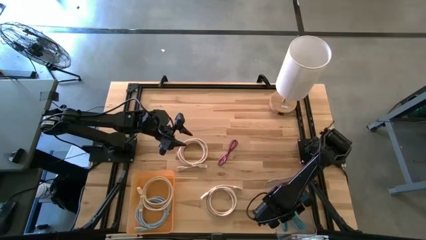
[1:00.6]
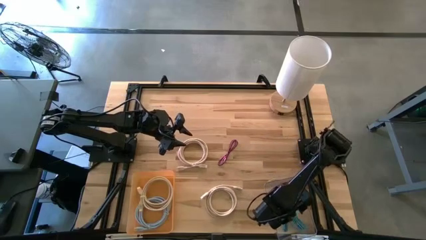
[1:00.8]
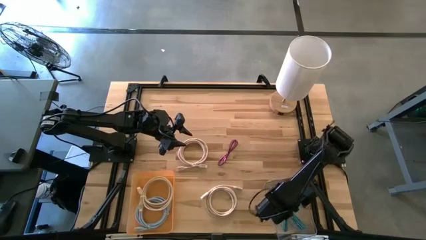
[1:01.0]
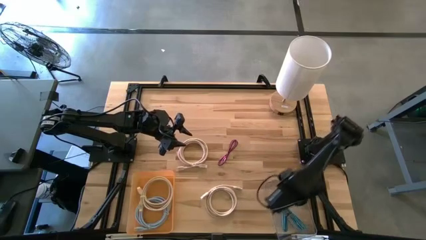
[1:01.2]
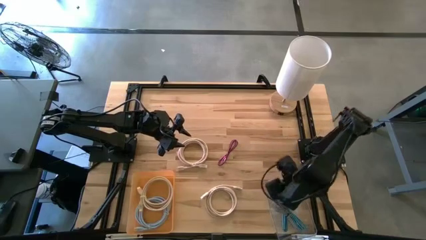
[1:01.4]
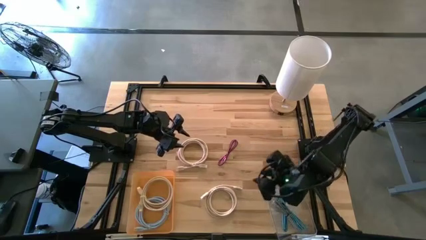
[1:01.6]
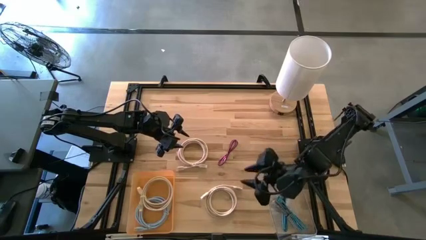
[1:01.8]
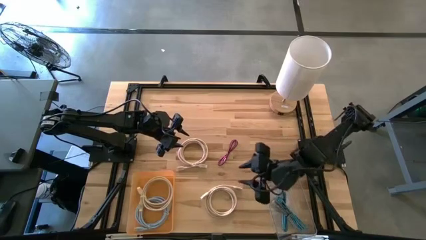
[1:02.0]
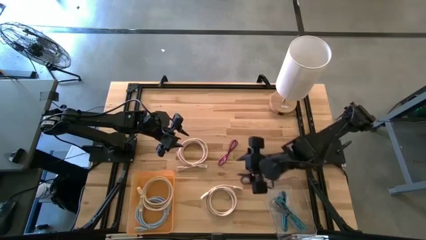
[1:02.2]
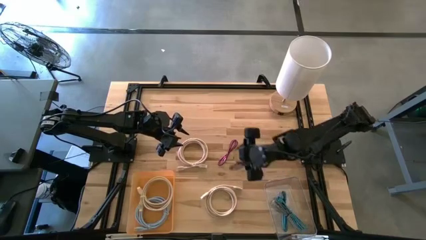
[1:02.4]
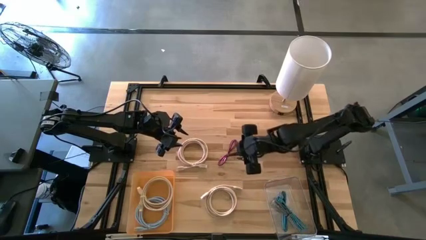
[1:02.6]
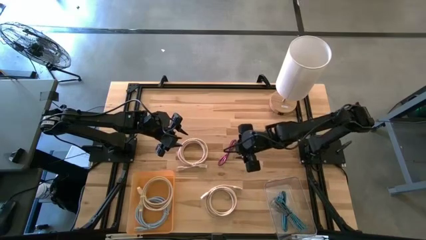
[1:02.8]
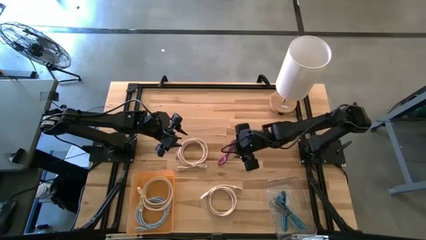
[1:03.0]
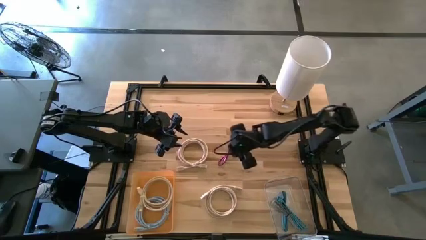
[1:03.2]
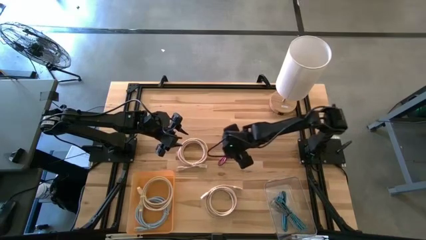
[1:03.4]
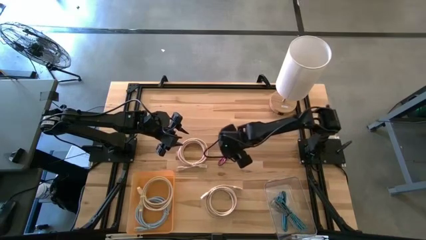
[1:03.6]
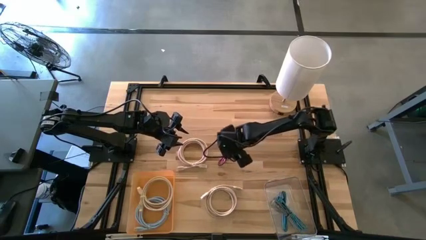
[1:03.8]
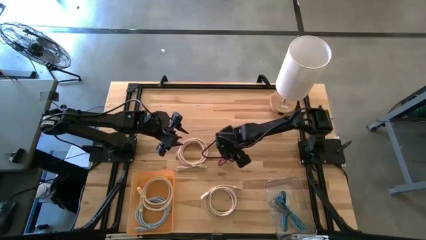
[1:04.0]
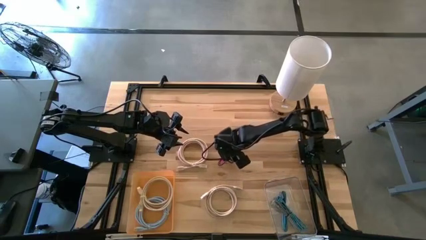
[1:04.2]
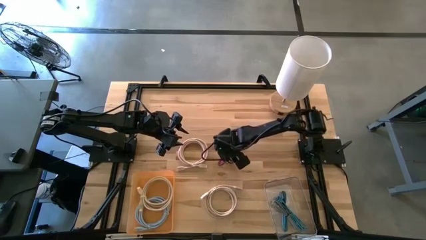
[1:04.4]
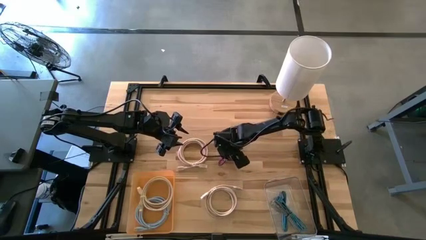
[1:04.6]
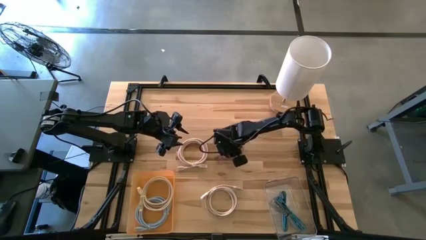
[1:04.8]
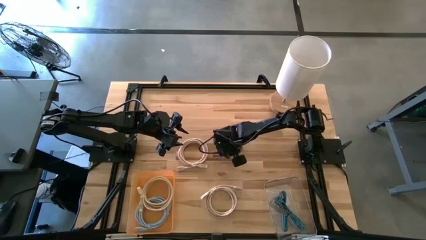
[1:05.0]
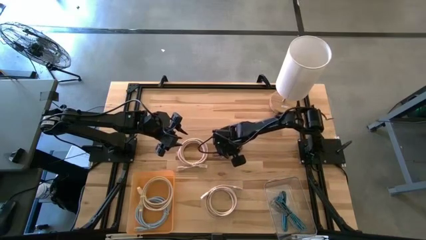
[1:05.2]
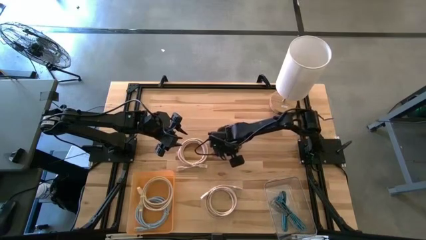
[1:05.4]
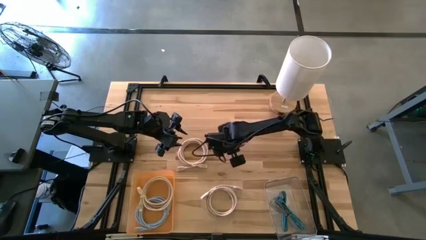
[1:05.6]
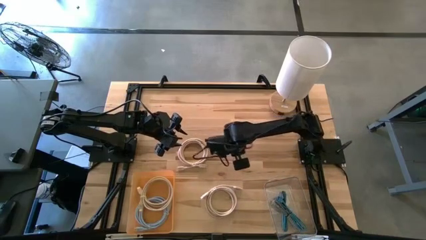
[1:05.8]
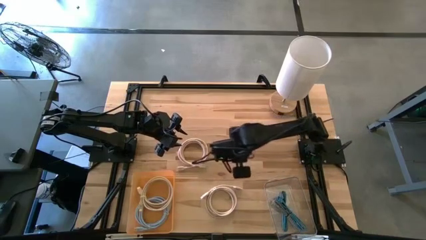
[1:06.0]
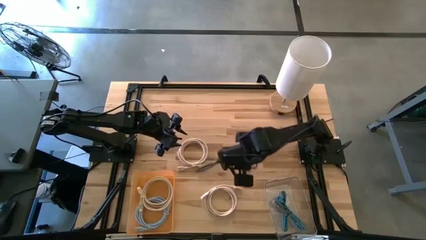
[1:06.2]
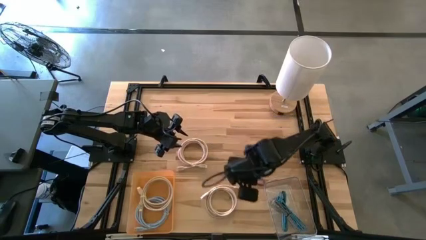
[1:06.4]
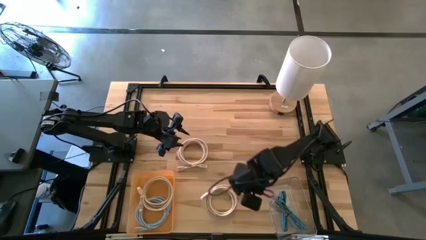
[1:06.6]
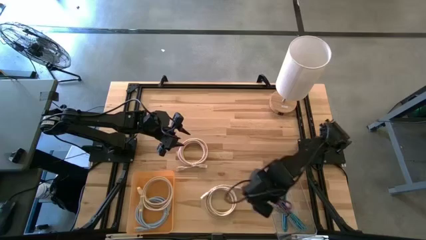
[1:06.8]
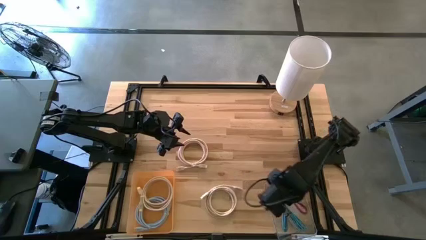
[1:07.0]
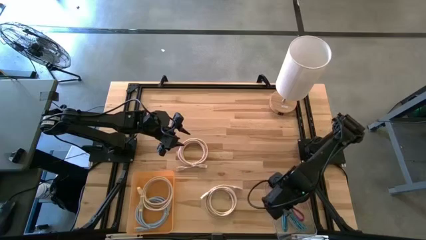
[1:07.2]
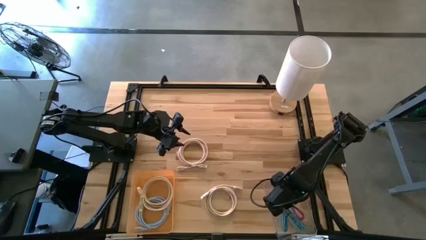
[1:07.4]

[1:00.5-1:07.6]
Task: Pick & Place USB Port
Put the pink USB cable into the transparent bin

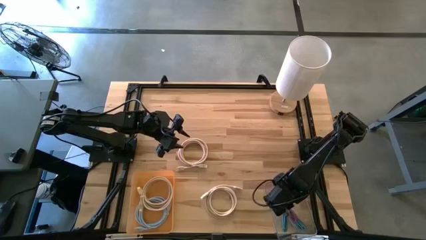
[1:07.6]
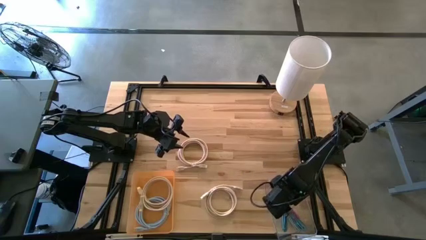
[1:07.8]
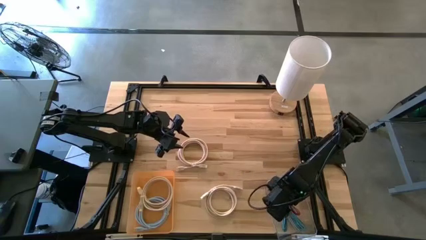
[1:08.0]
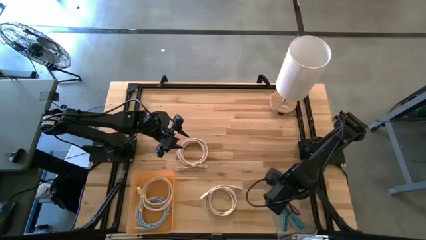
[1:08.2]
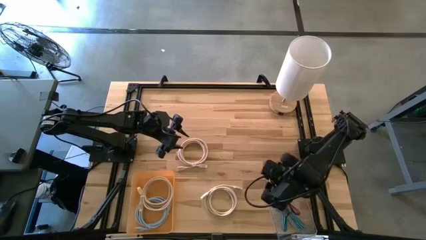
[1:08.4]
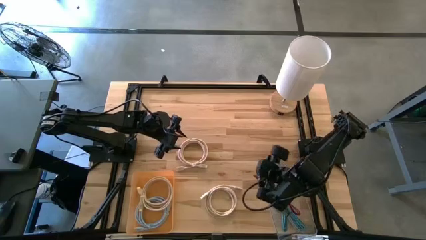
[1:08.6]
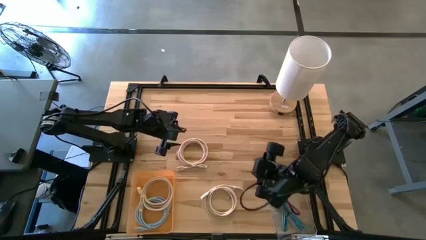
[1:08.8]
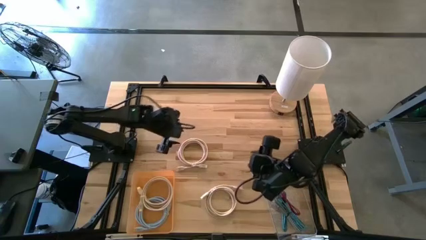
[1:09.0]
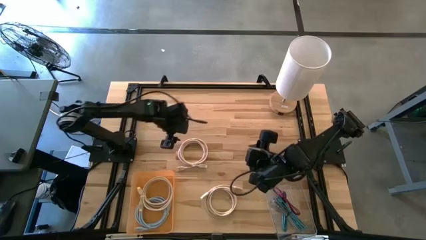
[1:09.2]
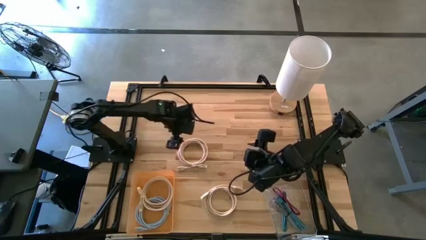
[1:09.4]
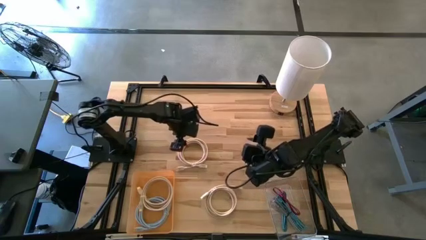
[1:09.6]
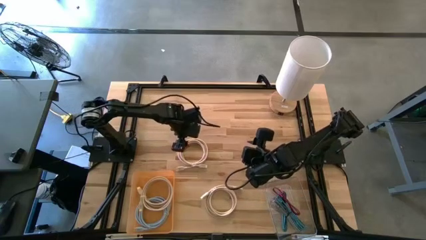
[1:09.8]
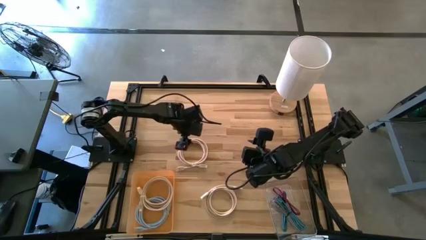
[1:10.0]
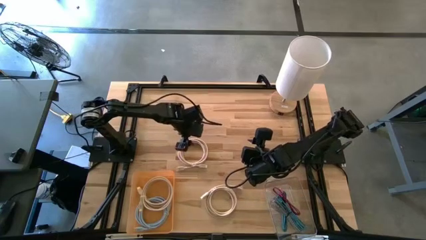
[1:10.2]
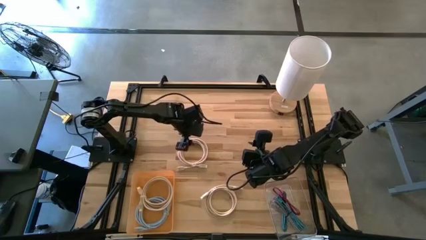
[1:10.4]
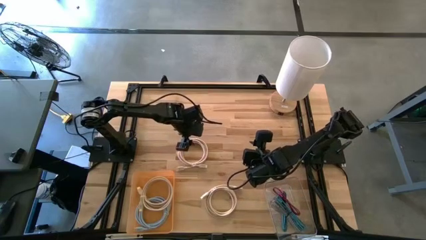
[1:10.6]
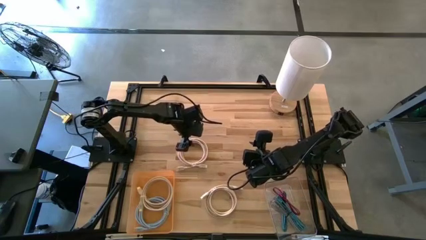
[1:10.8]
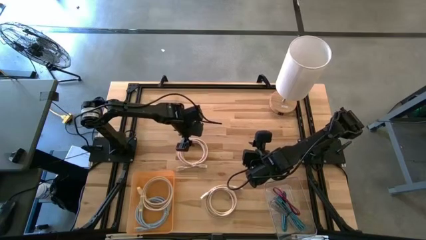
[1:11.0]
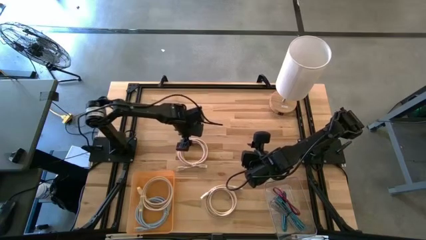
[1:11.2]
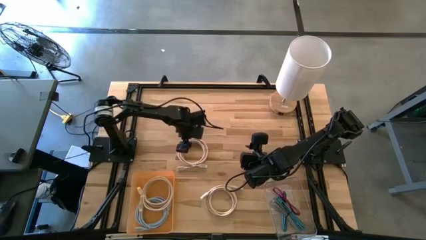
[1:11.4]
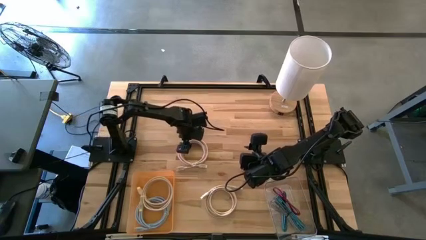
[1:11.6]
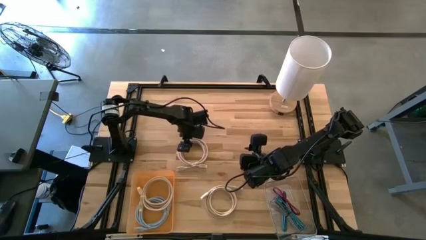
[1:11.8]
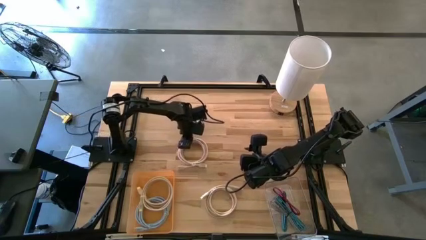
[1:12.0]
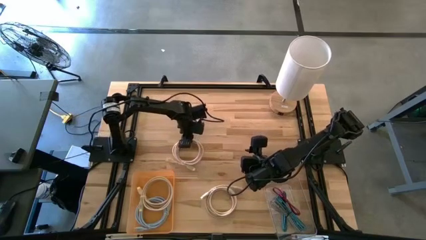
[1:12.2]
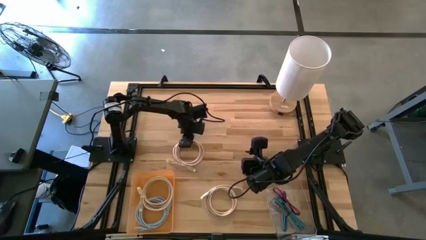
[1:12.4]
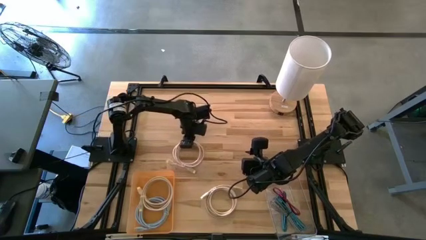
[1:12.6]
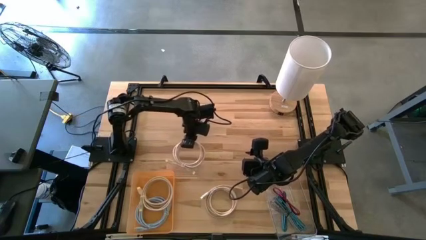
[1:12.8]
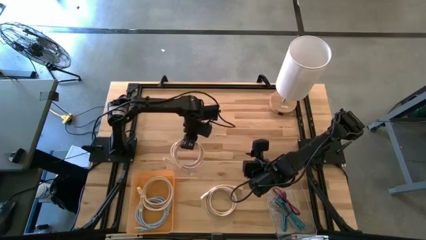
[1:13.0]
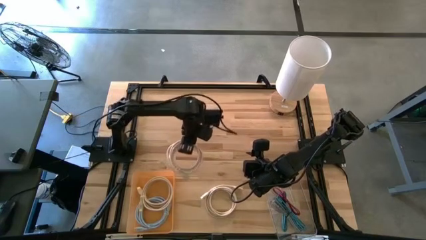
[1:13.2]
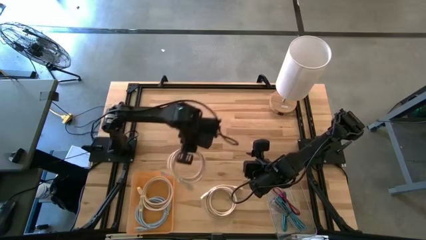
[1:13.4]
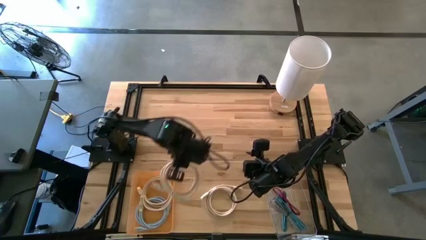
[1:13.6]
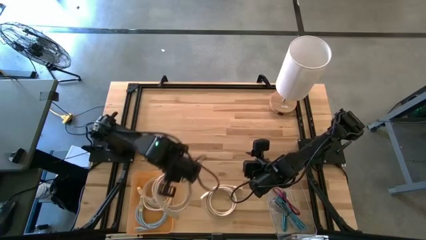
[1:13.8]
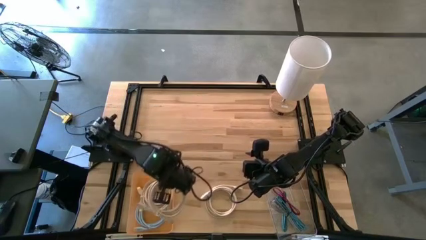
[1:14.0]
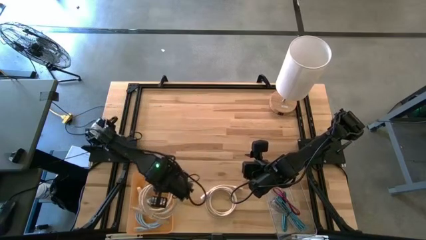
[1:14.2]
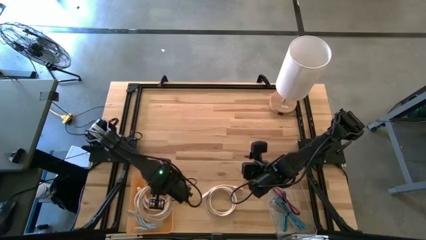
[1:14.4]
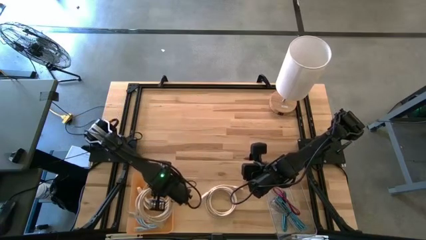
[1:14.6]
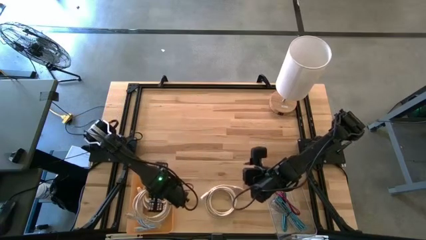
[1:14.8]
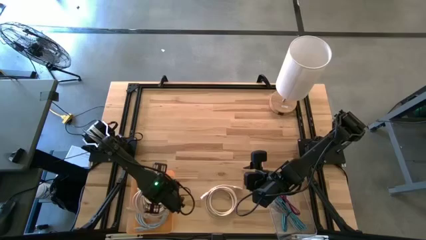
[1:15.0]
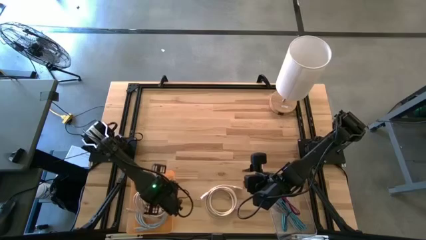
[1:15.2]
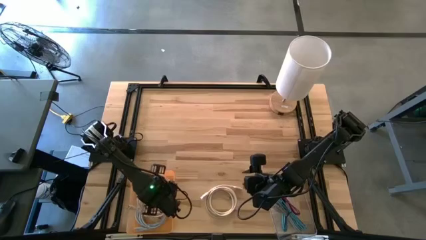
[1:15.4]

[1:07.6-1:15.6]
Put the top light brown HDMI cable into the orange bin

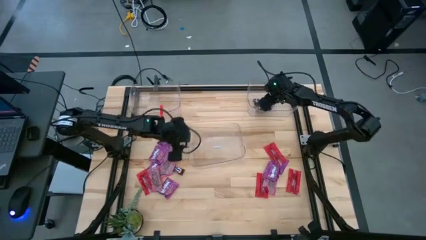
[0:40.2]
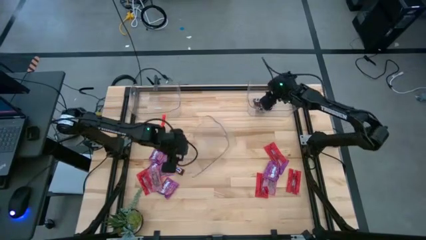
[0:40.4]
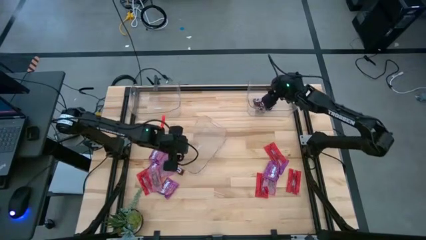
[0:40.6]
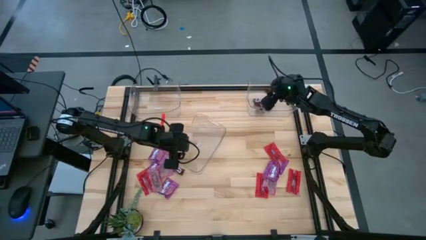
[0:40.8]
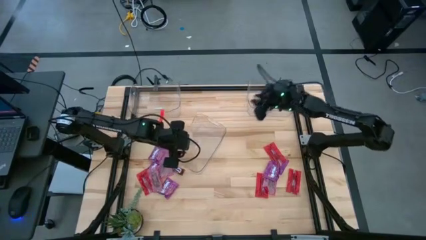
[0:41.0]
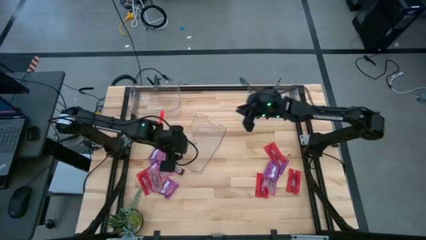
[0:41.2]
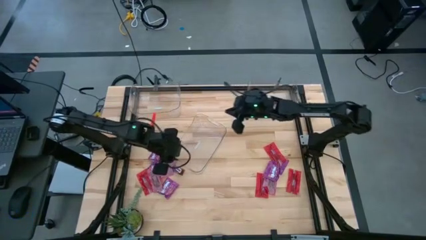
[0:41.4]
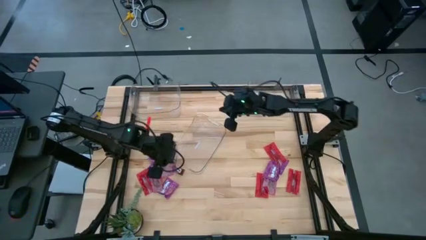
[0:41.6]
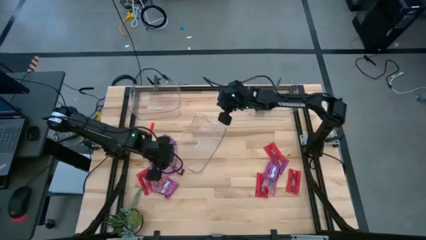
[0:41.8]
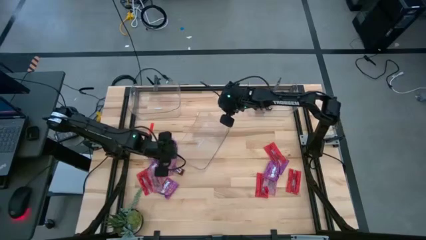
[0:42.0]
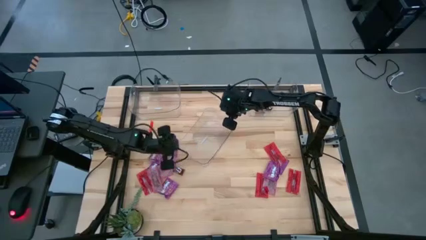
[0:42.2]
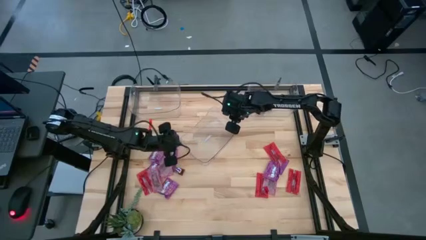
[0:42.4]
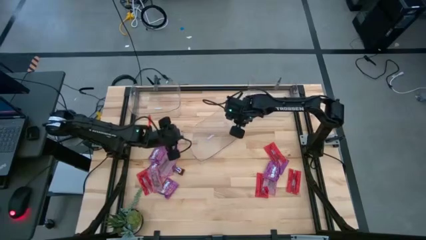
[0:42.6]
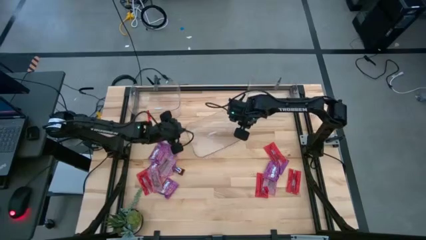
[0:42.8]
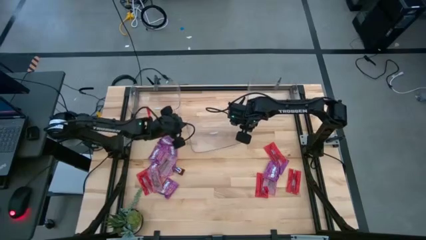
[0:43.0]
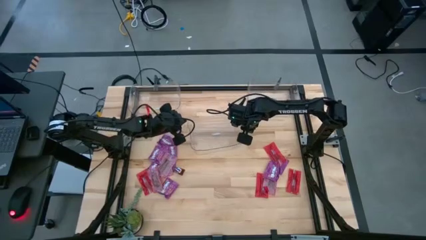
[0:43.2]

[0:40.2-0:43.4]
Task: Sort candy
Adjust the bottom transparent bin
